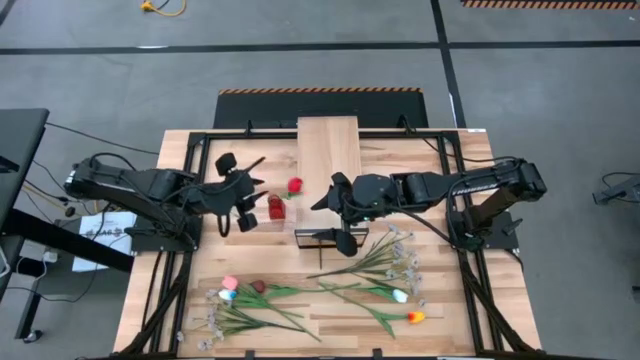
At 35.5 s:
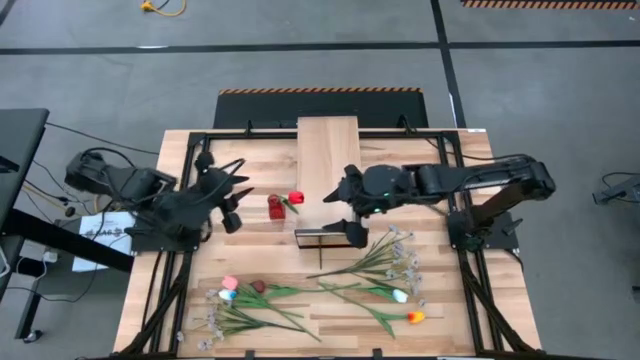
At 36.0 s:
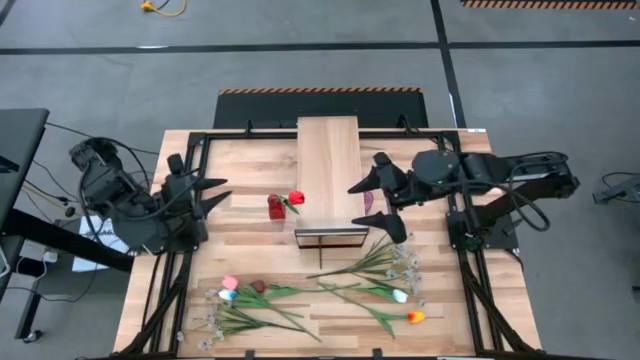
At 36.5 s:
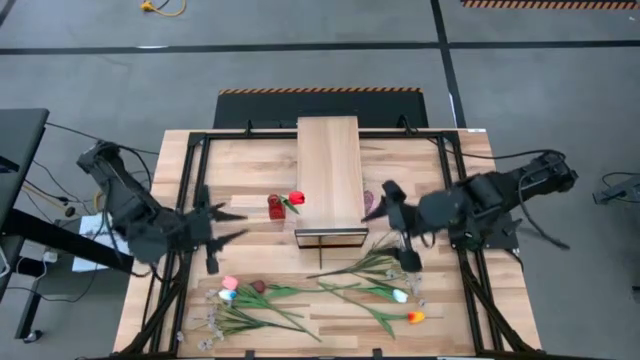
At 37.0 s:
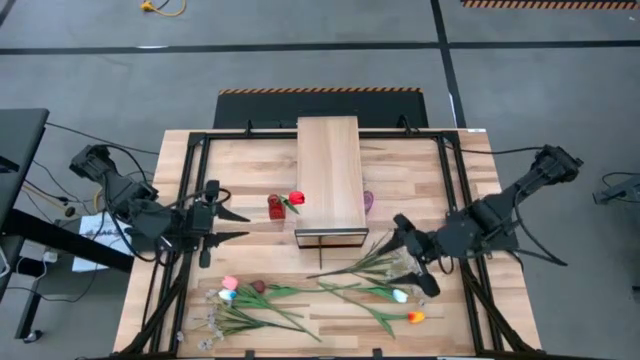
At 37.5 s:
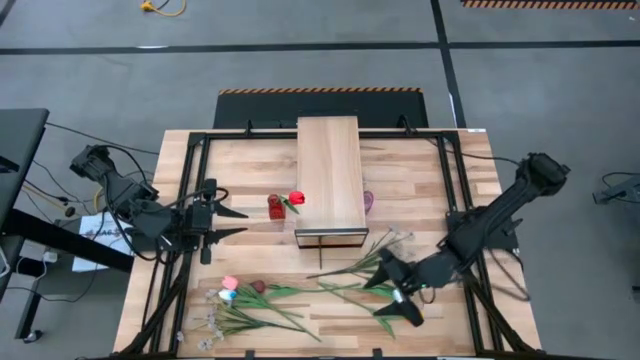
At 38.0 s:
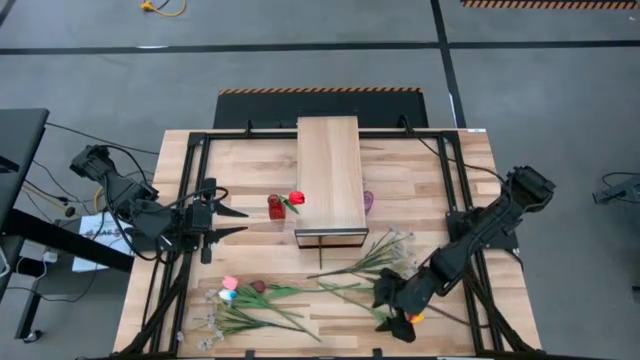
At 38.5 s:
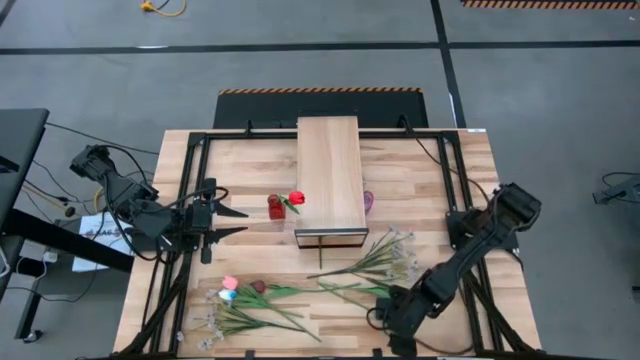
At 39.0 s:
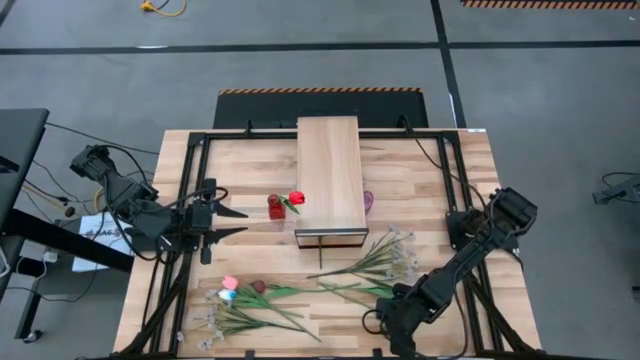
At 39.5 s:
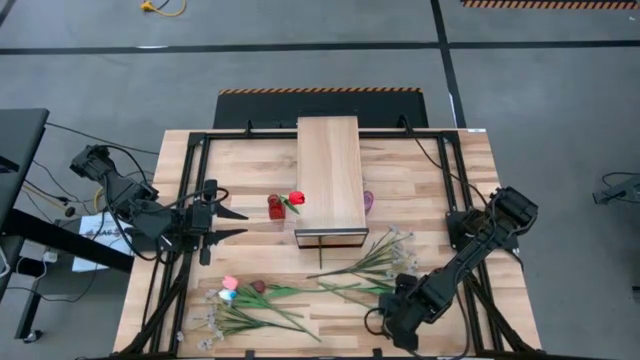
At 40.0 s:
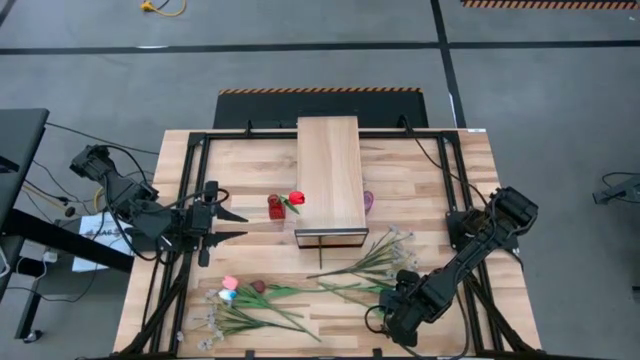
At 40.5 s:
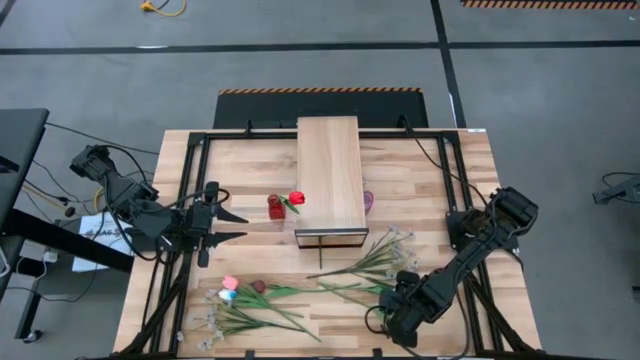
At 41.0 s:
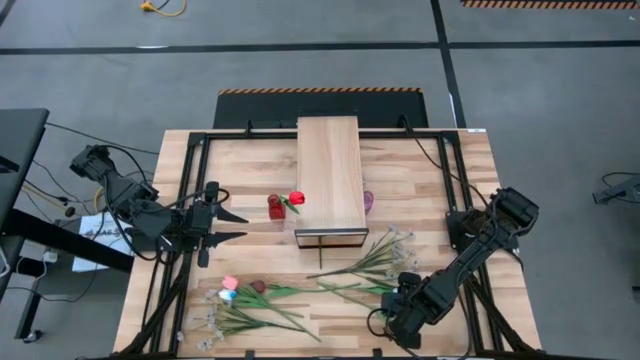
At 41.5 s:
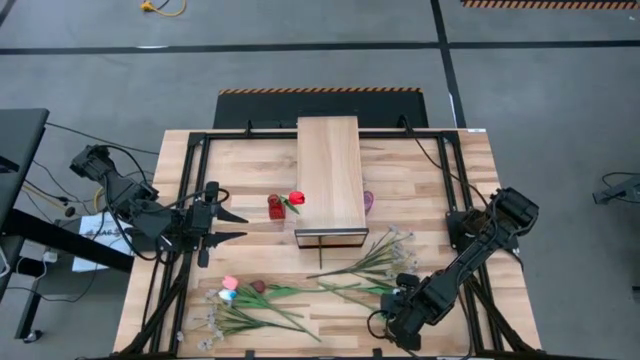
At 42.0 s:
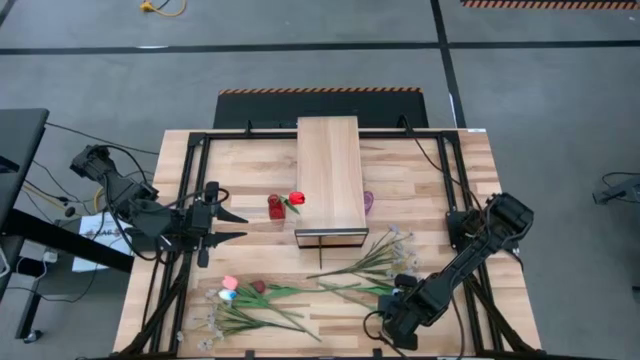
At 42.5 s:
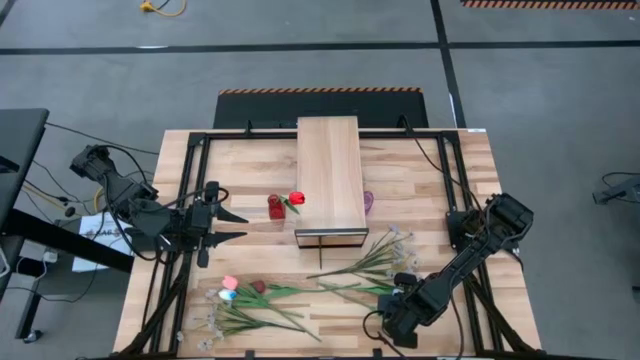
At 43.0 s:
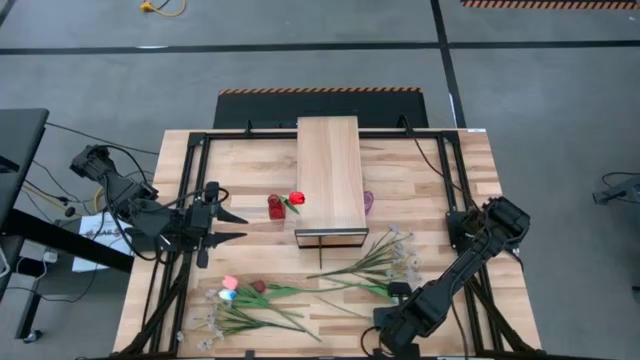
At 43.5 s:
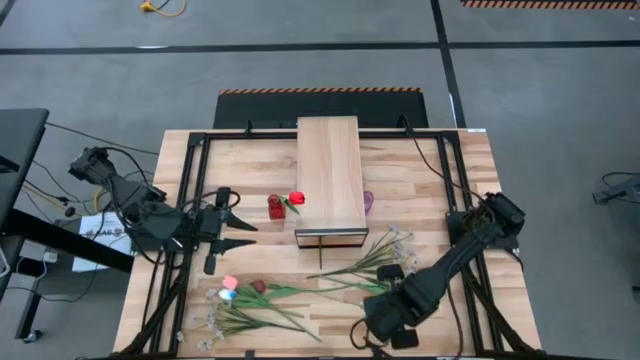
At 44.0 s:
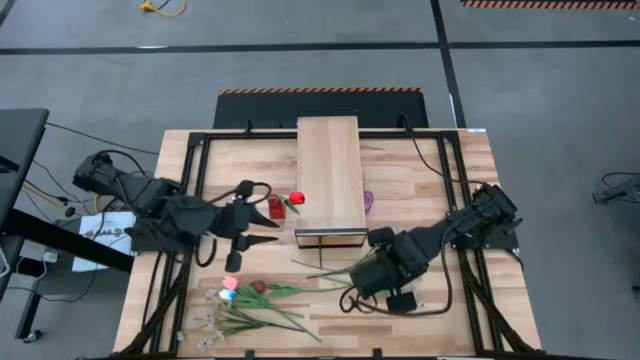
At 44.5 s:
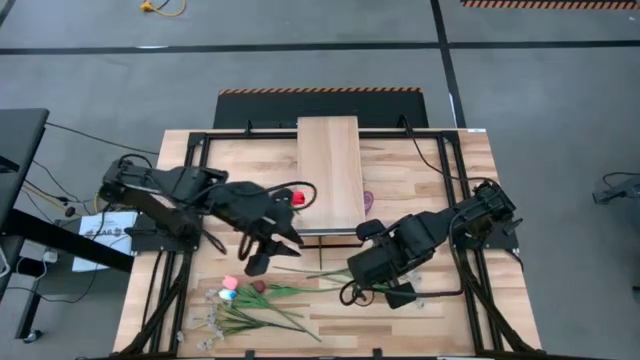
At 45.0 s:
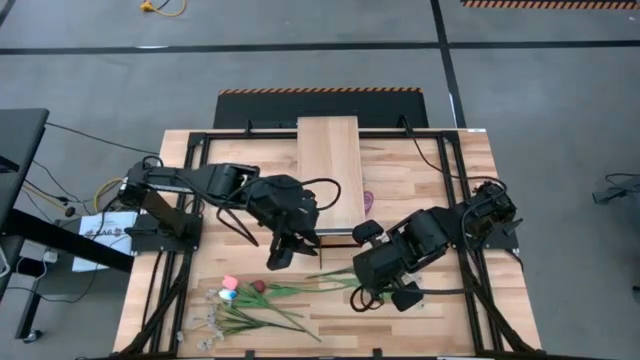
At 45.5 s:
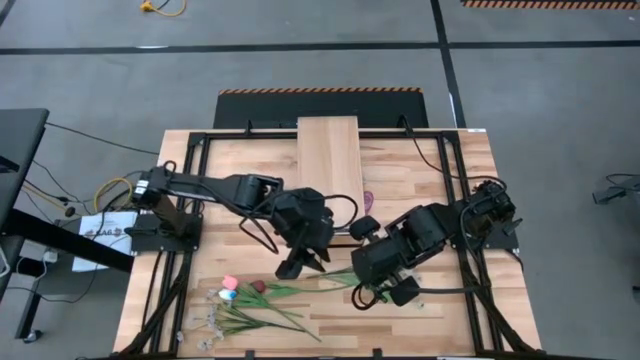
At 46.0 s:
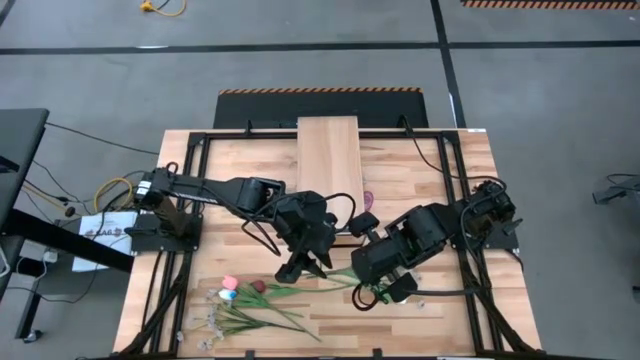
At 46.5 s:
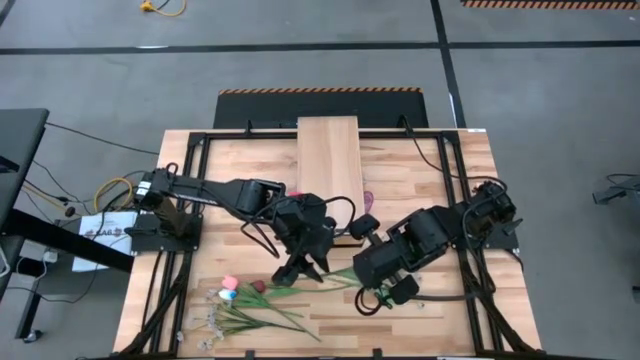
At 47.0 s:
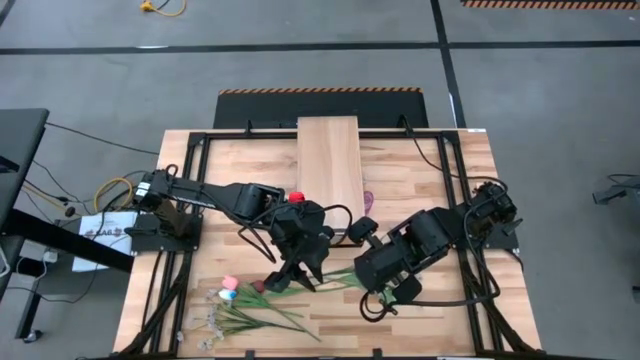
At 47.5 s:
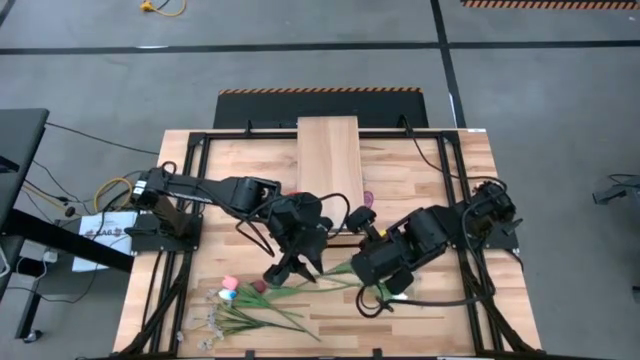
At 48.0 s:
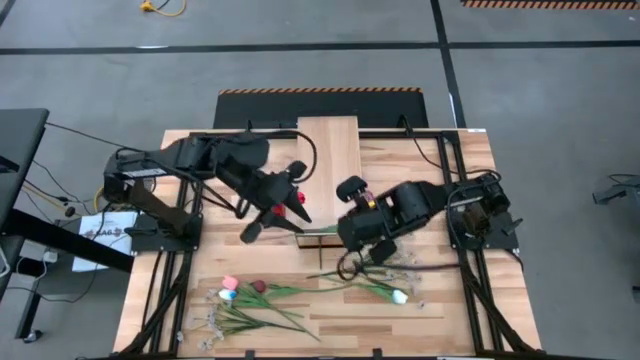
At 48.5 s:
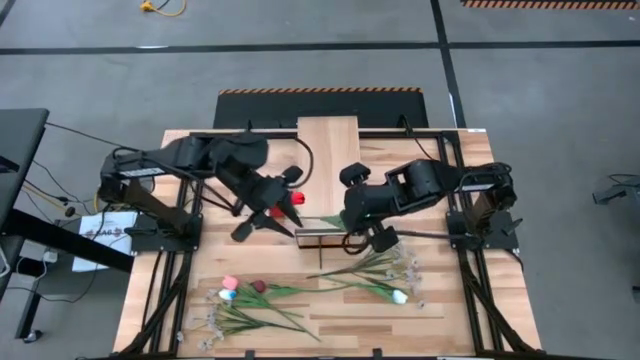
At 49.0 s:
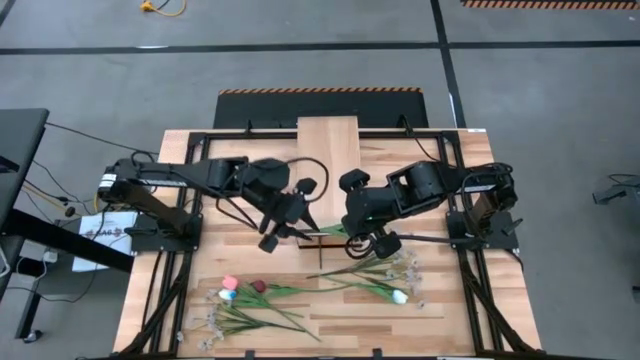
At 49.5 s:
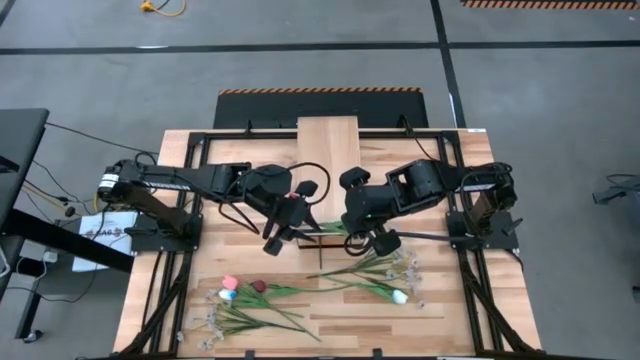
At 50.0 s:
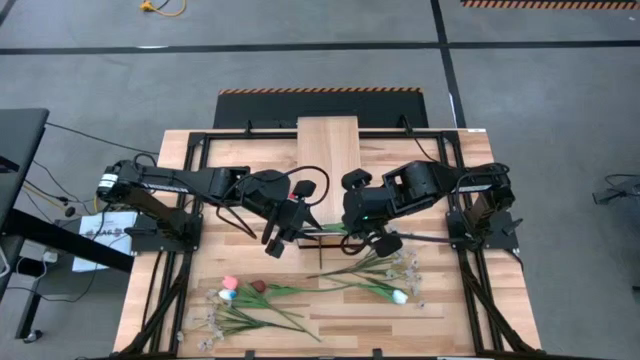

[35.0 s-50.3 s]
Task: Pick and place flowers into a vace then onto a shelf
Put the yellow tulip into the red flower vase

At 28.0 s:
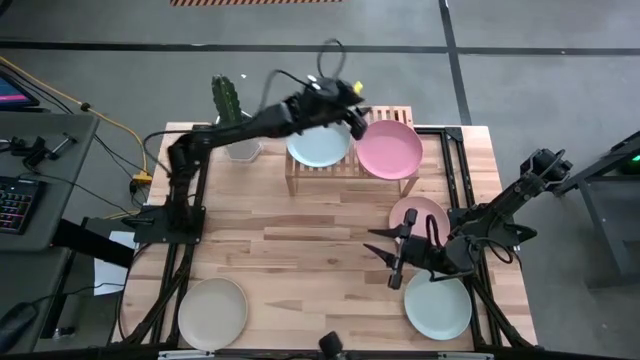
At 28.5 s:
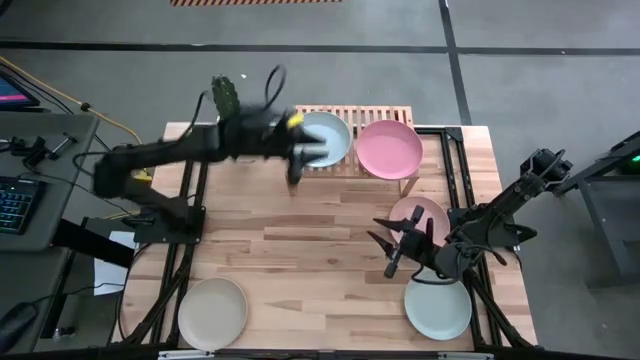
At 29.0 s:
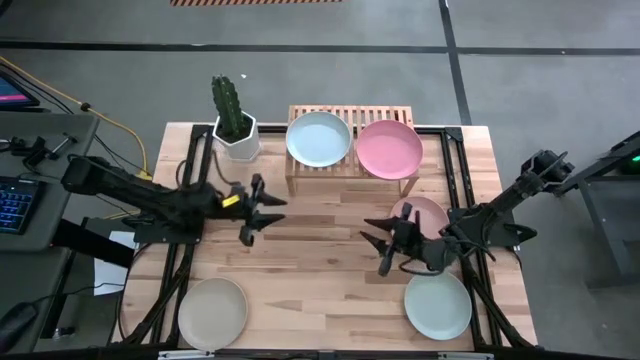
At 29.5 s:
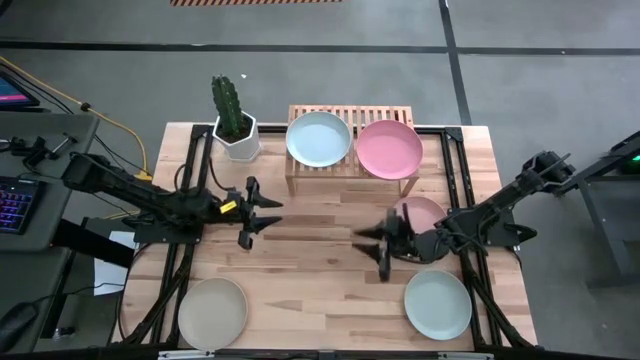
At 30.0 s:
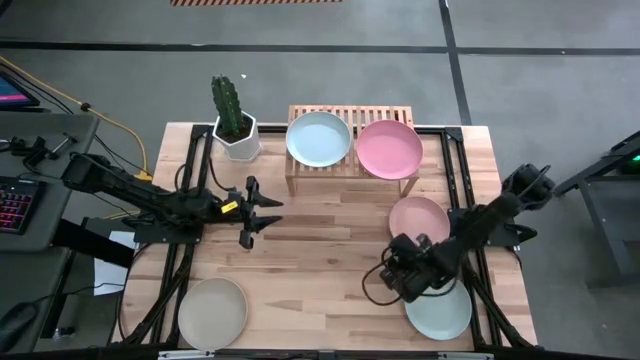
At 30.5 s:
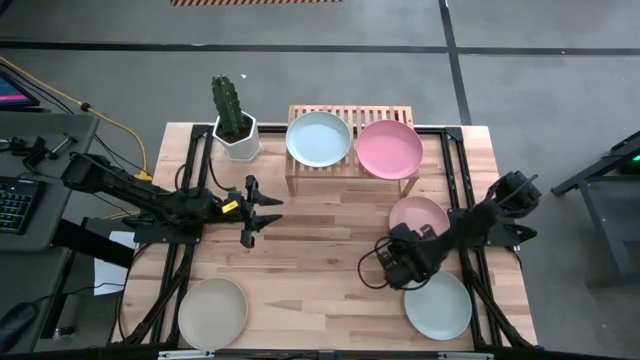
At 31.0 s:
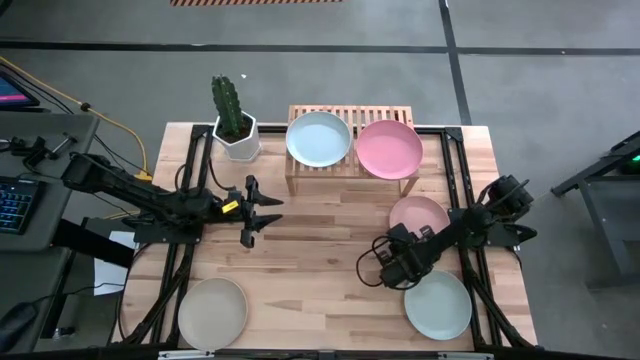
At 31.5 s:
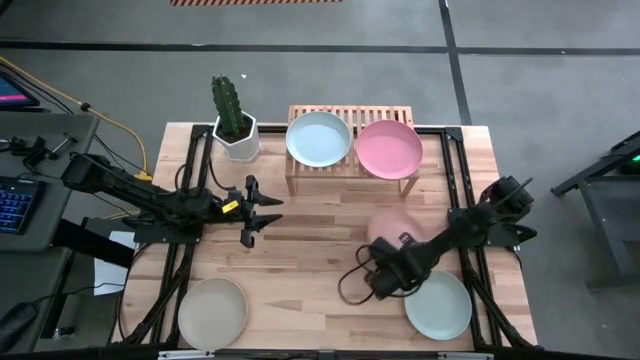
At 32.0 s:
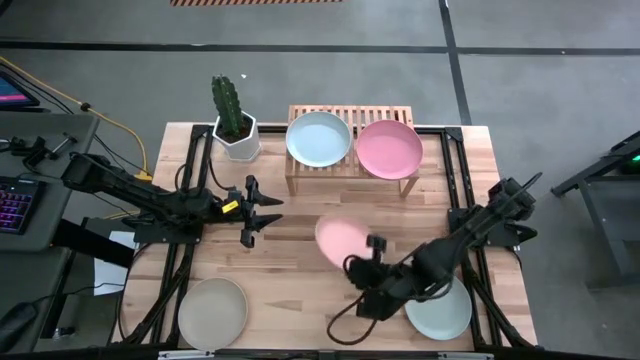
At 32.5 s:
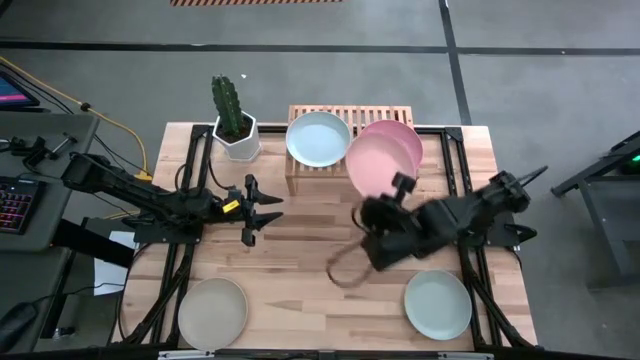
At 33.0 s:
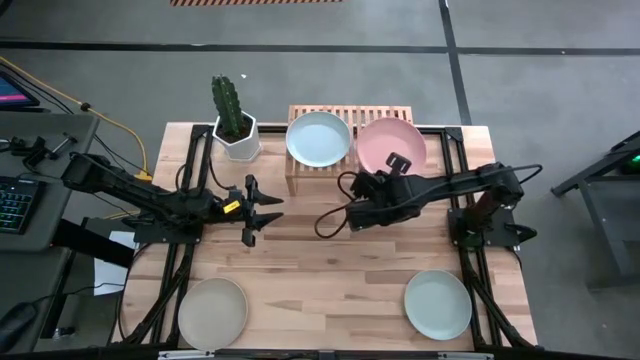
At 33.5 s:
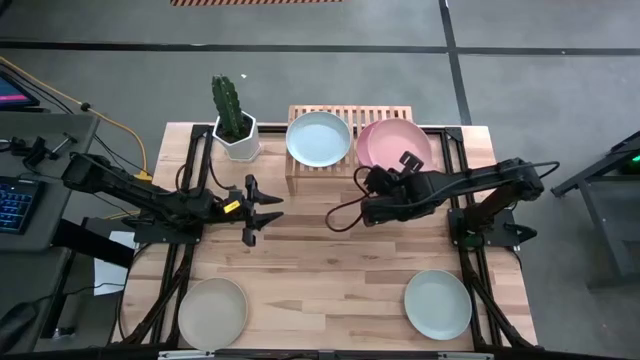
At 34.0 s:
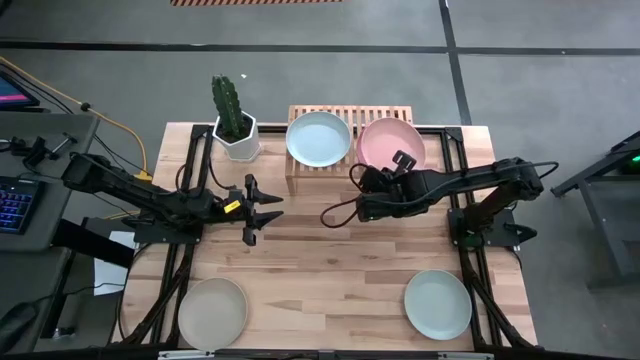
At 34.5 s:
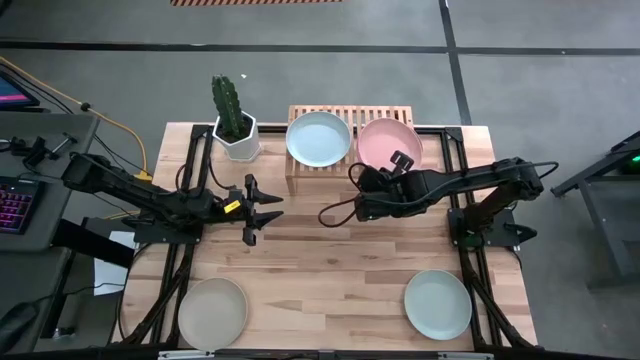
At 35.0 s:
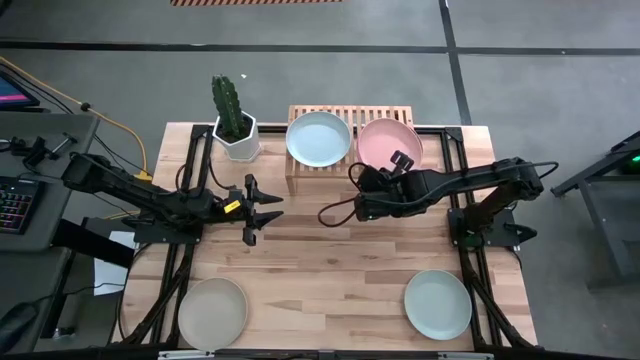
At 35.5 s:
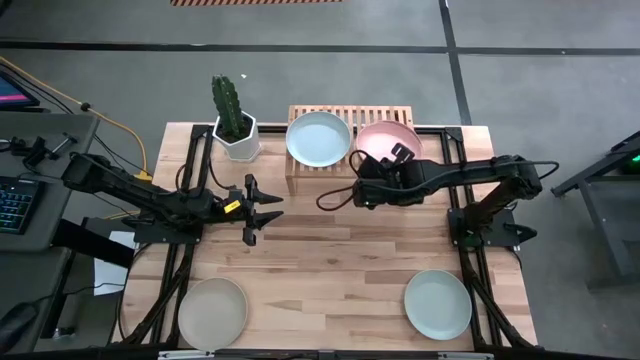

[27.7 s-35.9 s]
Task: Place and stack plates onto a shelf
Stack the light pink plate on top of the pink plate on the shelf
